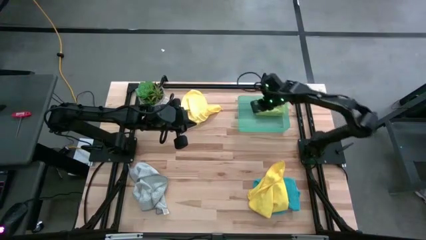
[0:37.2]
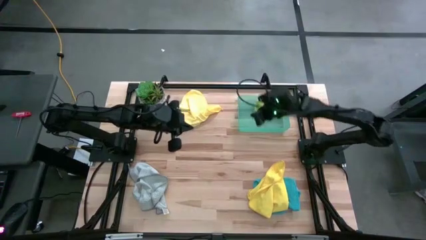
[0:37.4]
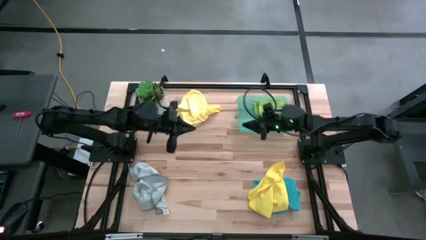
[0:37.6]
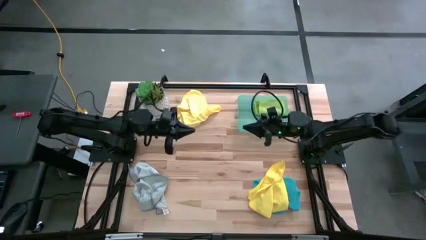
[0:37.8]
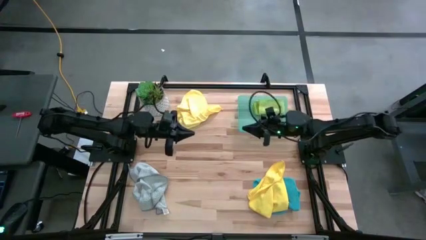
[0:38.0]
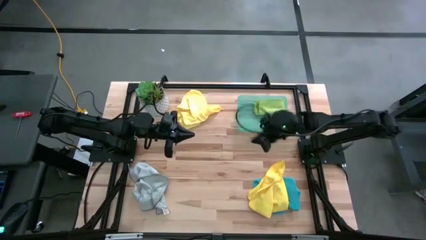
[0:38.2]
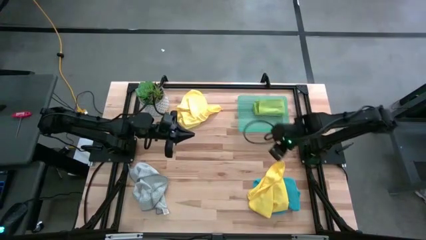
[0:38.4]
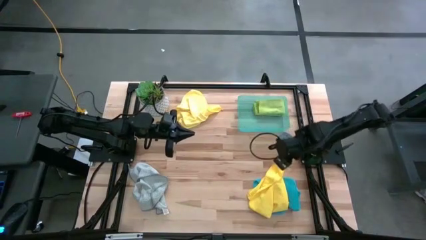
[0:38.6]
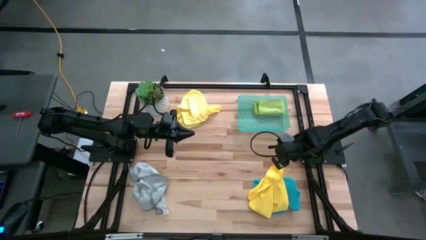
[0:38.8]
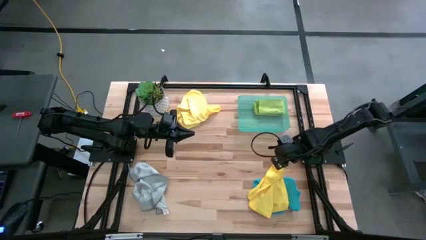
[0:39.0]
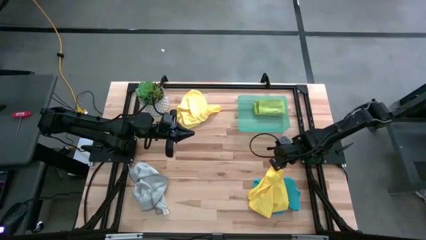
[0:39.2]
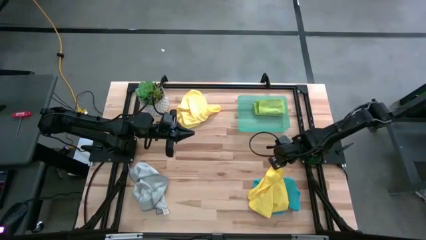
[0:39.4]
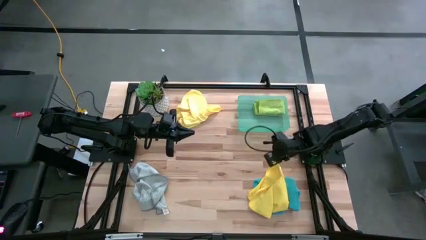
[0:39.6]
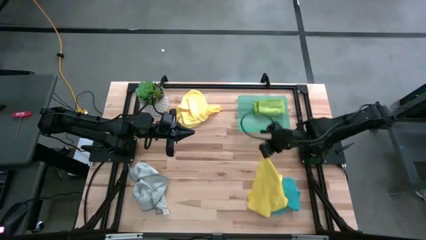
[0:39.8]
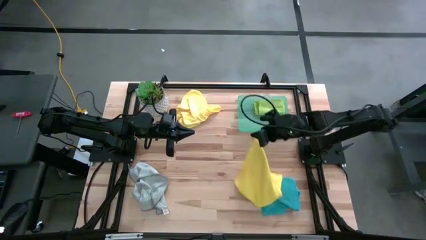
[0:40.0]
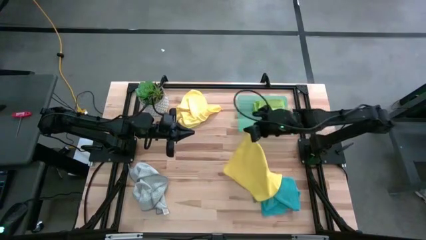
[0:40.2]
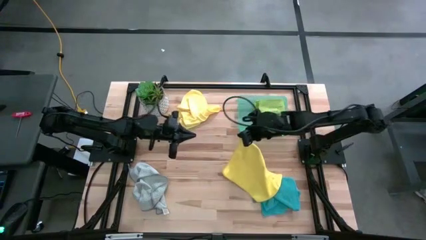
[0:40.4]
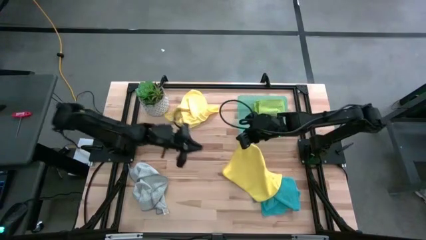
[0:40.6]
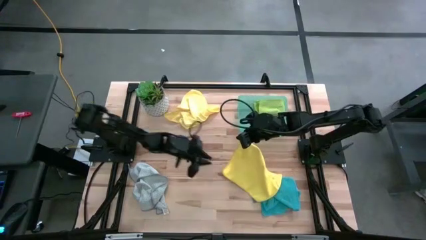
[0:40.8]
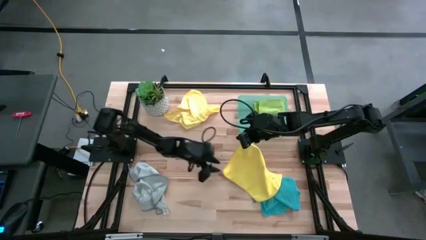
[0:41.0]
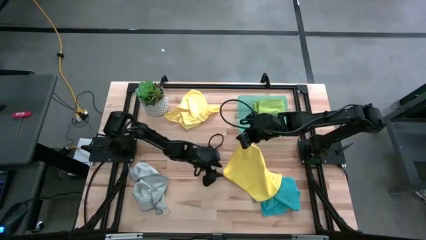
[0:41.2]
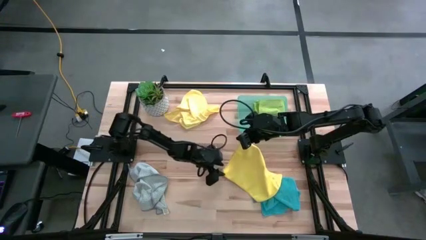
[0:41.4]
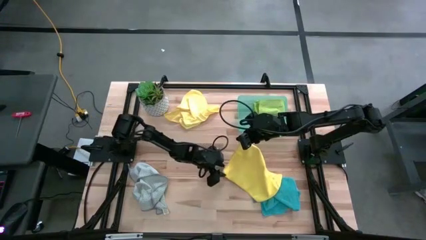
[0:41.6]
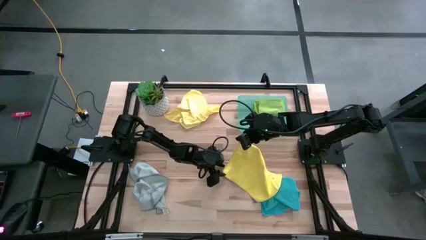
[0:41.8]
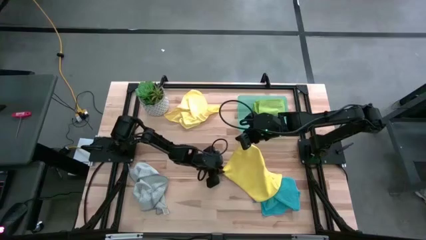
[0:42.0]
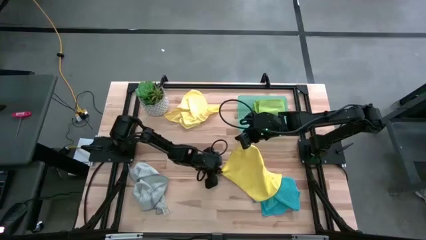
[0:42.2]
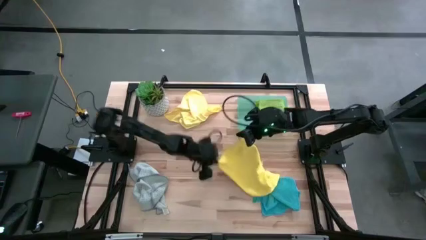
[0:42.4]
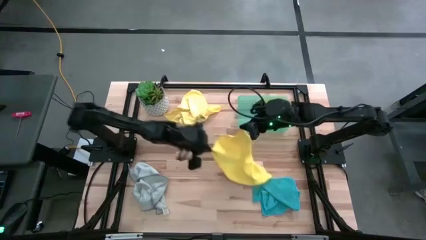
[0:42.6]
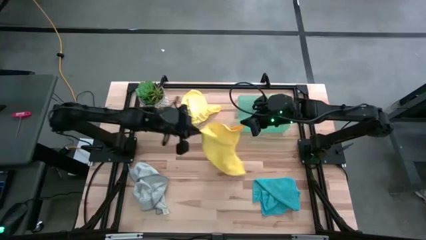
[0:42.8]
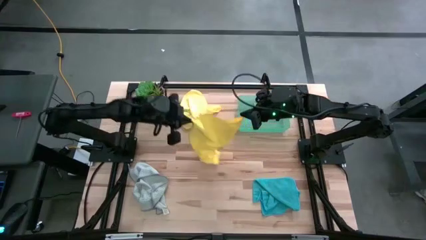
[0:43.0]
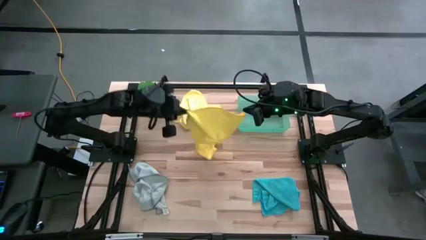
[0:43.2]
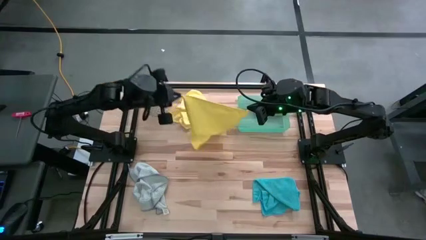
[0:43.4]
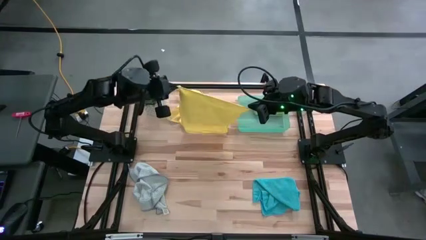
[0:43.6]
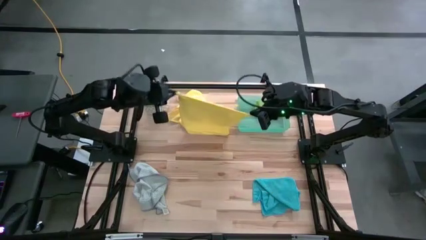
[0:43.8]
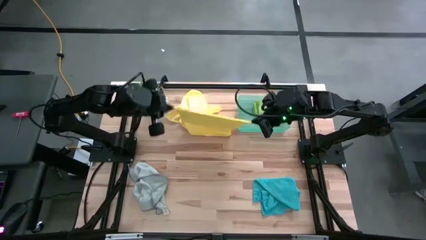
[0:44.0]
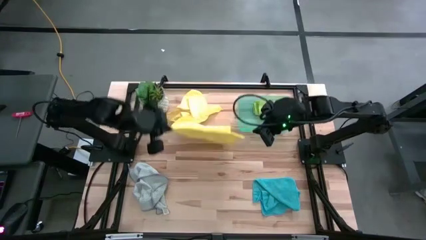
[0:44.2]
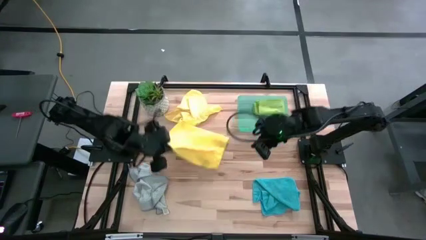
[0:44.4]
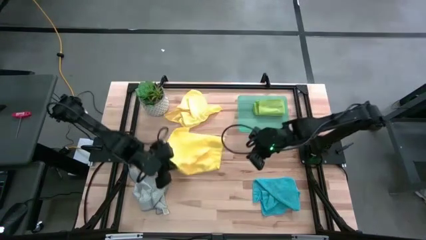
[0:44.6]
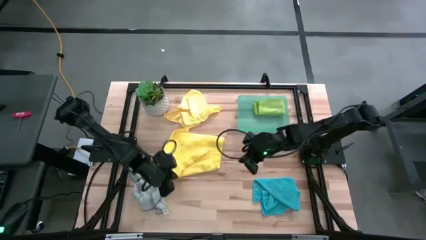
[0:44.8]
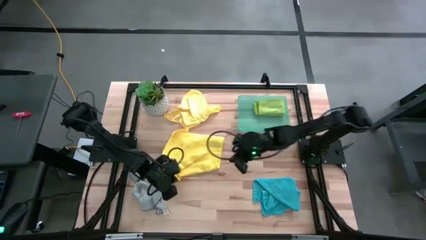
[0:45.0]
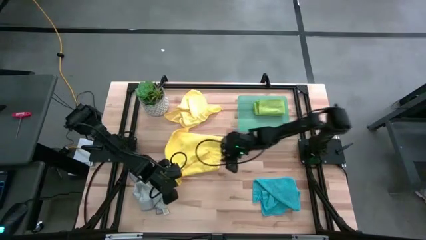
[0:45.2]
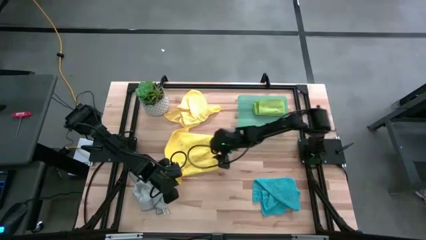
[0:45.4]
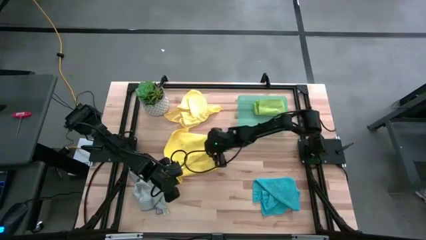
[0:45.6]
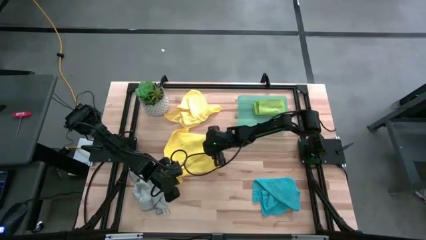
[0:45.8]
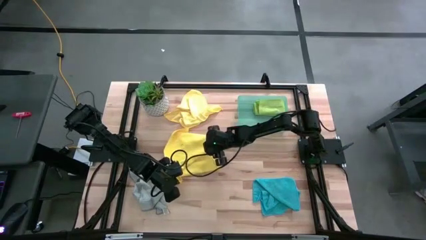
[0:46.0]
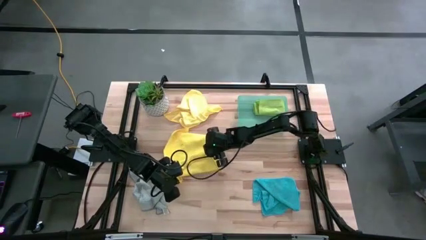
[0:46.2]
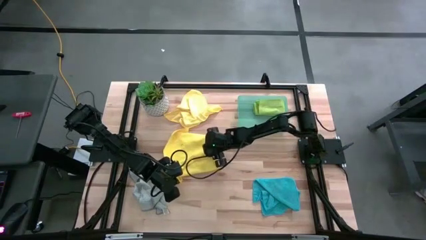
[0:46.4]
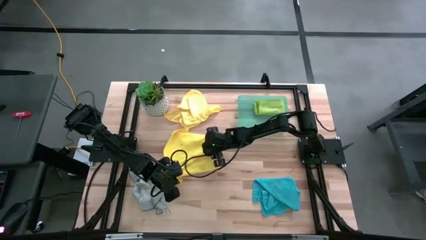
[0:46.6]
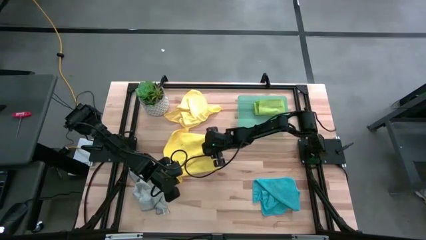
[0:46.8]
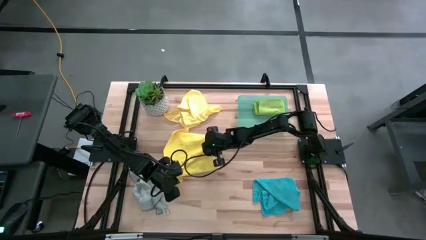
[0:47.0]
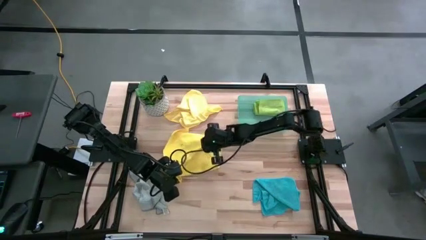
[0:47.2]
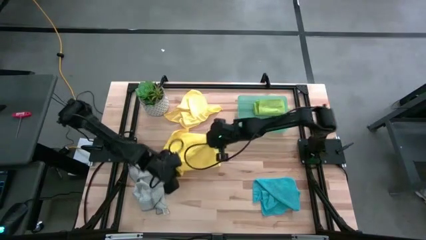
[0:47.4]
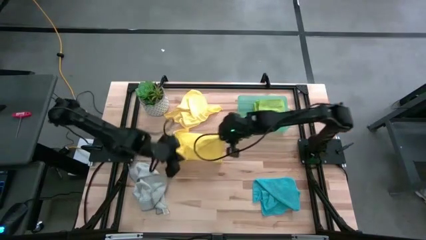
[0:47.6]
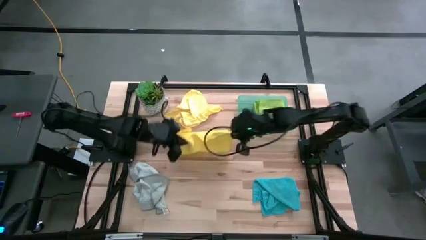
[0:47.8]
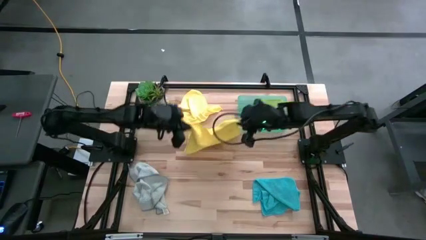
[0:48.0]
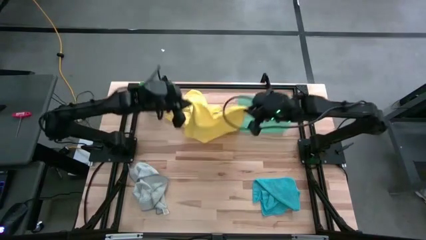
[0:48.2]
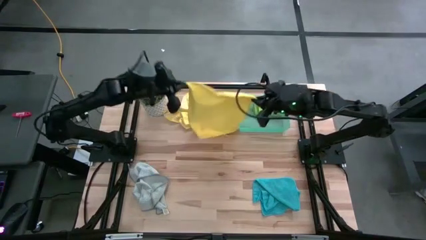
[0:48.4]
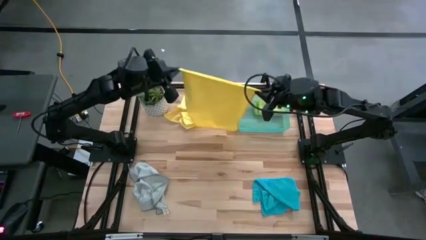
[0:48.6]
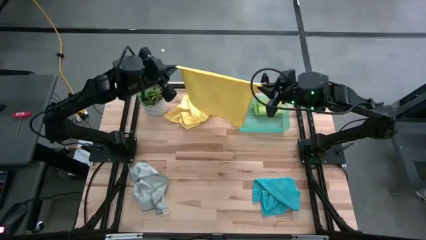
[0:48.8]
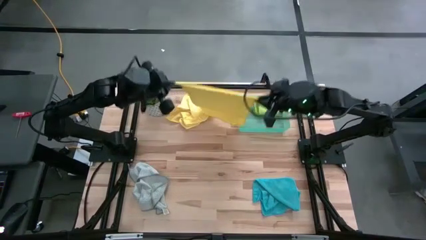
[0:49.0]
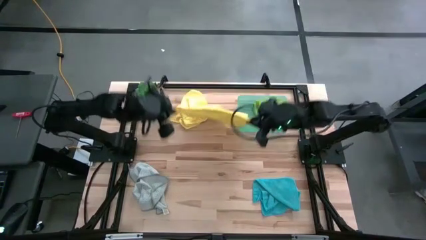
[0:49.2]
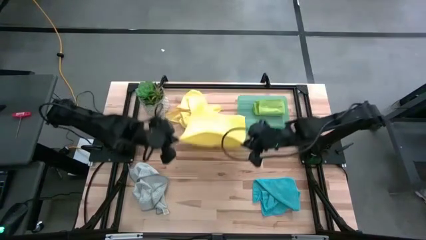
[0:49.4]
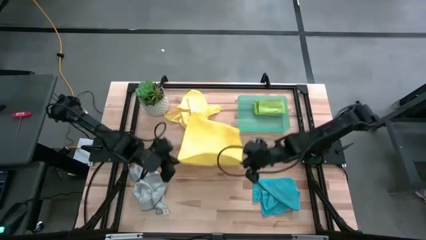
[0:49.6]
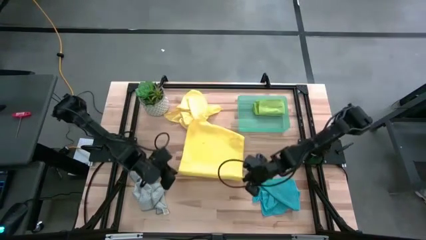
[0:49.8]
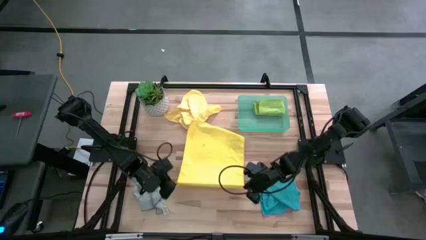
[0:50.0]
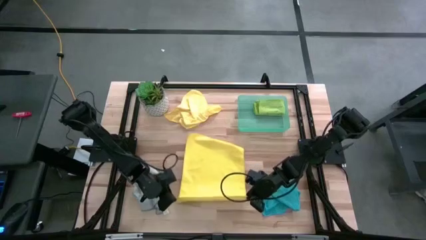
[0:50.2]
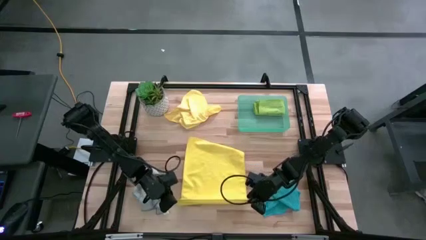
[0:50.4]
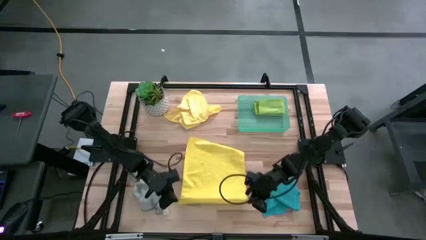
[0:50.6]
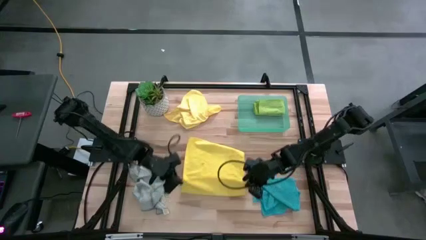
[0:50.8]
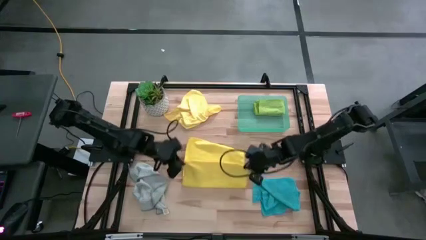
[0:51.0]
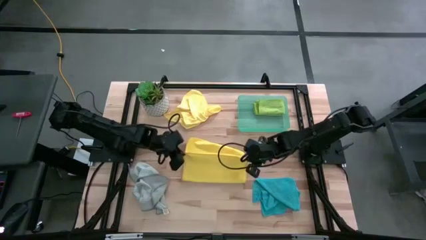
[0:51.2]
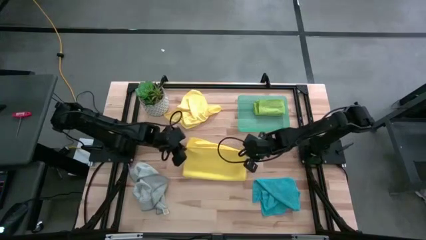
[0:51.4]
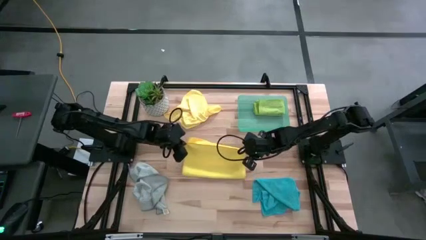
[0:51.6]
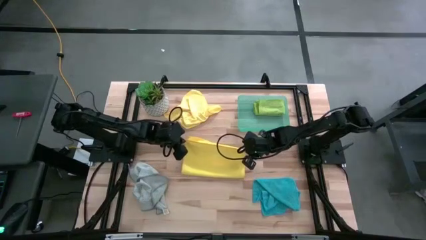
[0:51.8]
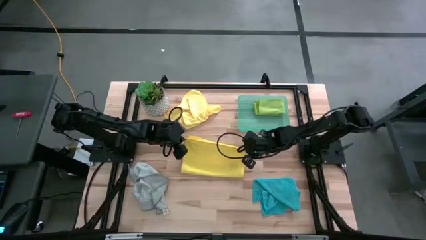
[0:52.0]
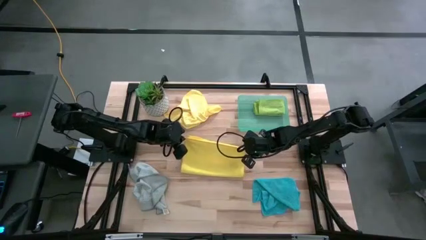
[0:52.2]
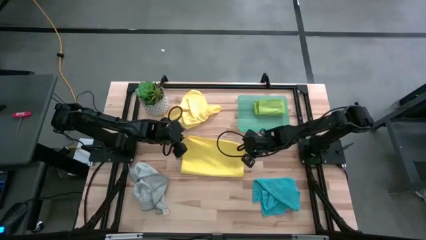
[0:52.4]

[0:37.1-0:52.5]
Task: Fold microfiber towels
Fold the bottom yellow towel
